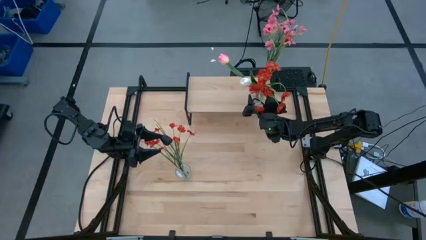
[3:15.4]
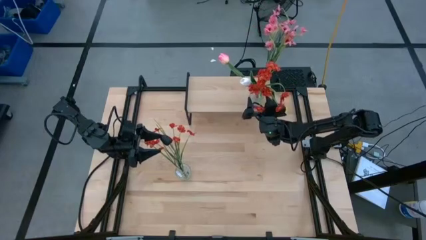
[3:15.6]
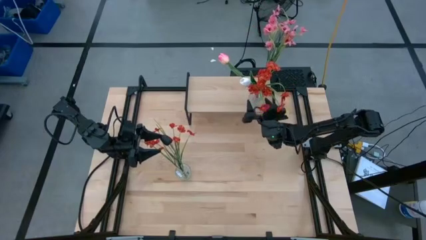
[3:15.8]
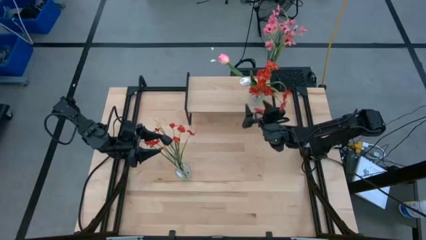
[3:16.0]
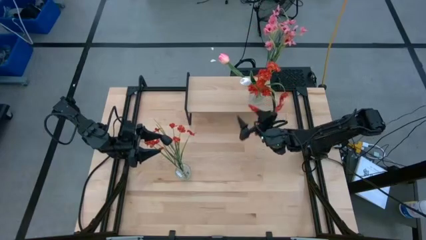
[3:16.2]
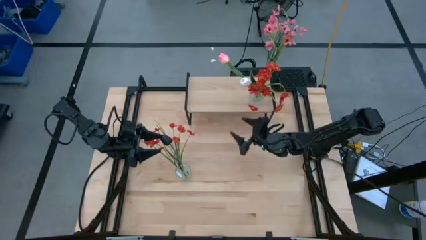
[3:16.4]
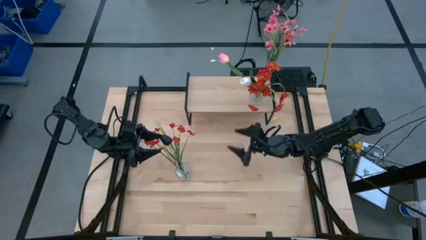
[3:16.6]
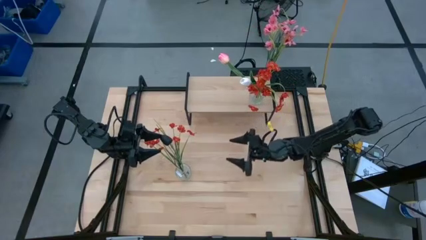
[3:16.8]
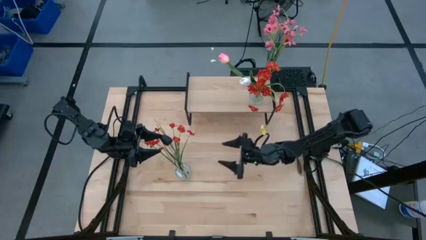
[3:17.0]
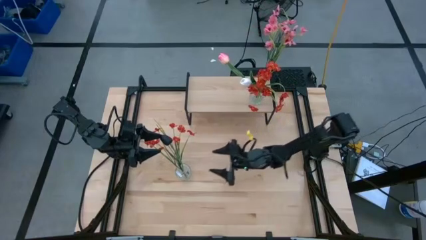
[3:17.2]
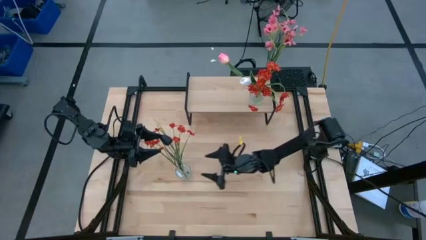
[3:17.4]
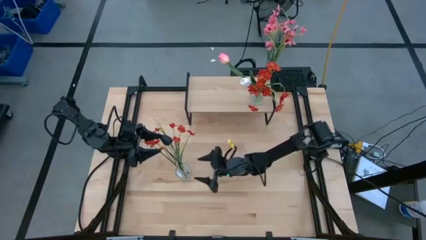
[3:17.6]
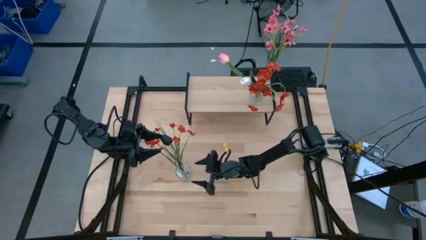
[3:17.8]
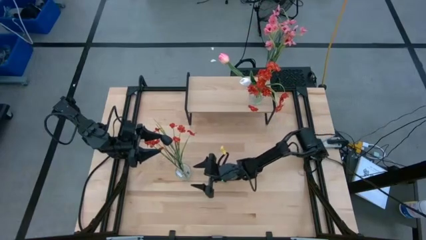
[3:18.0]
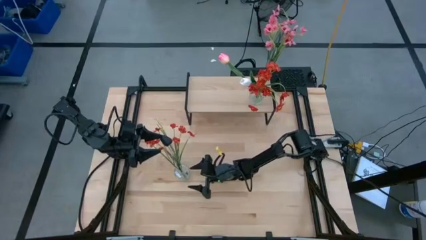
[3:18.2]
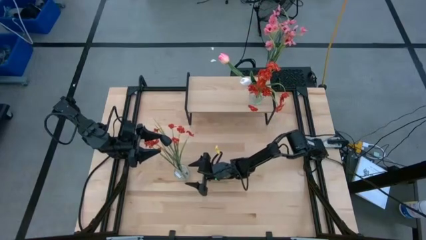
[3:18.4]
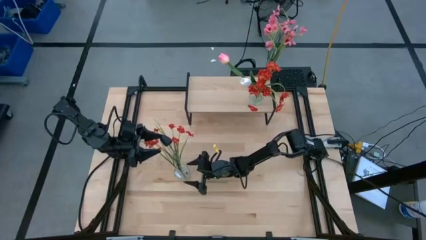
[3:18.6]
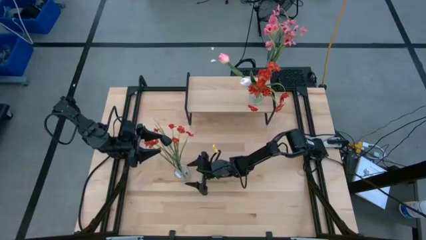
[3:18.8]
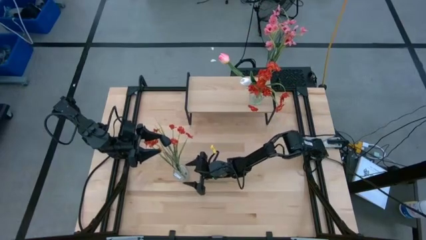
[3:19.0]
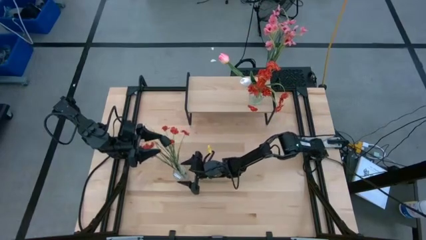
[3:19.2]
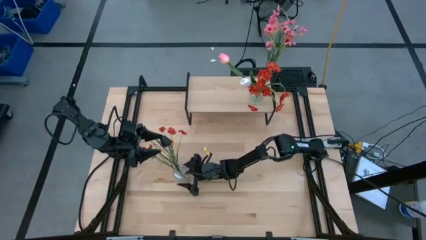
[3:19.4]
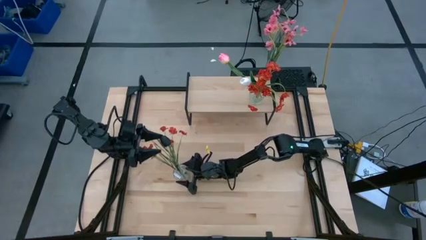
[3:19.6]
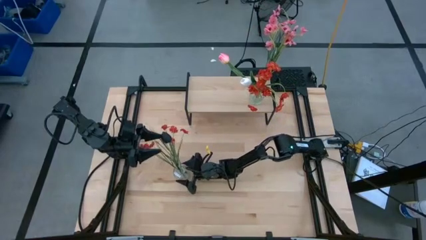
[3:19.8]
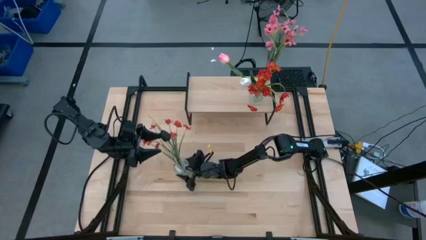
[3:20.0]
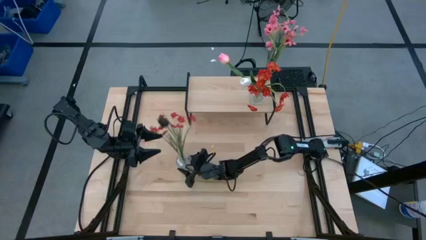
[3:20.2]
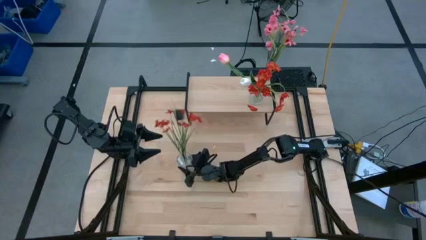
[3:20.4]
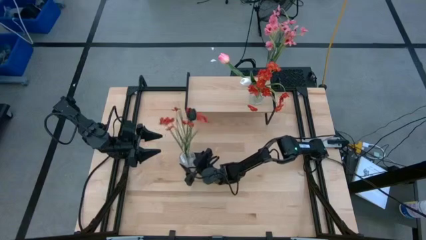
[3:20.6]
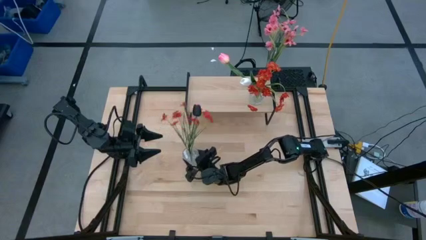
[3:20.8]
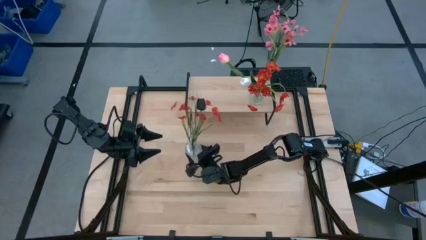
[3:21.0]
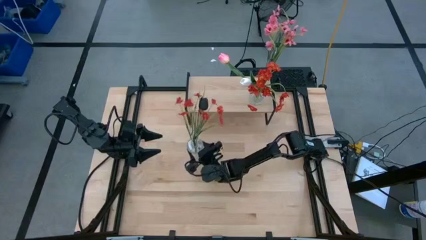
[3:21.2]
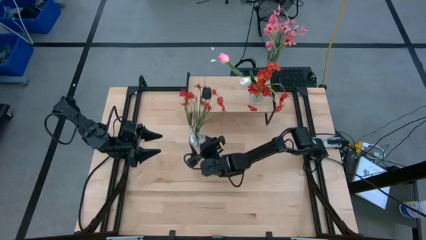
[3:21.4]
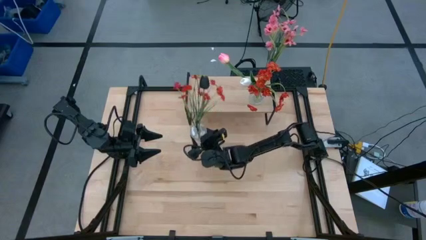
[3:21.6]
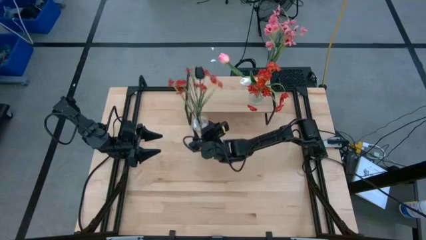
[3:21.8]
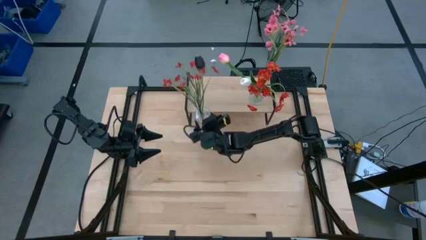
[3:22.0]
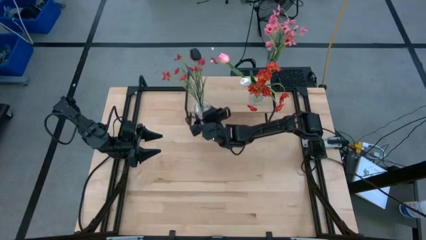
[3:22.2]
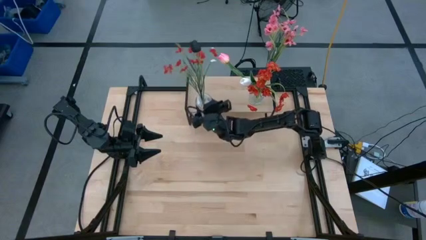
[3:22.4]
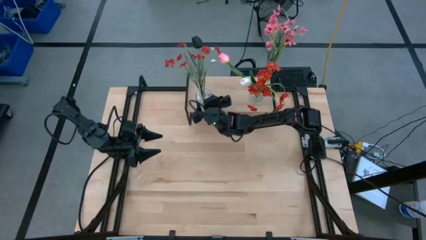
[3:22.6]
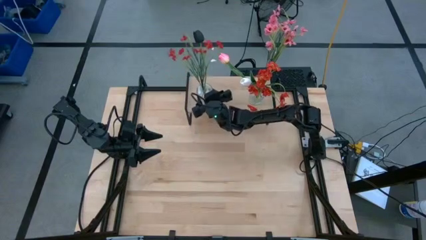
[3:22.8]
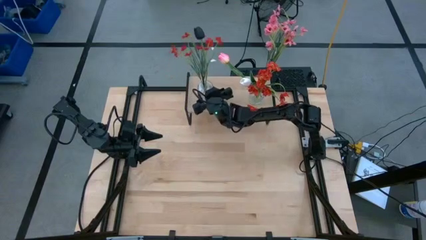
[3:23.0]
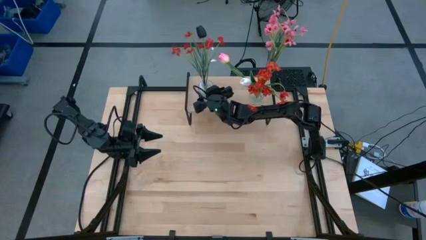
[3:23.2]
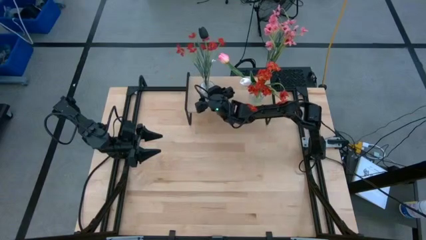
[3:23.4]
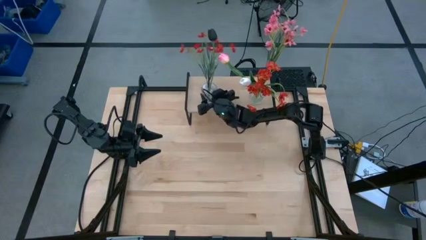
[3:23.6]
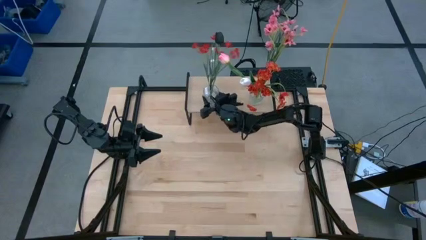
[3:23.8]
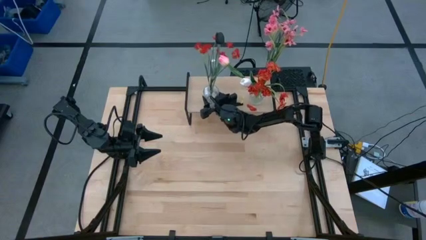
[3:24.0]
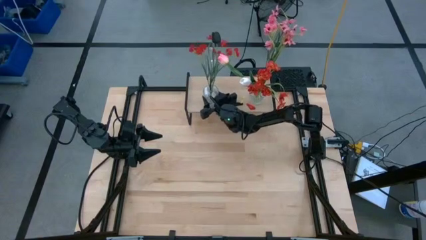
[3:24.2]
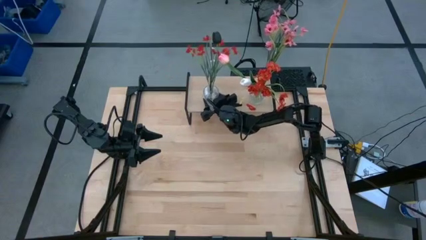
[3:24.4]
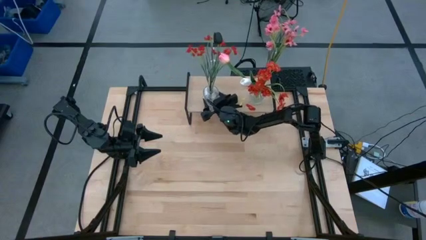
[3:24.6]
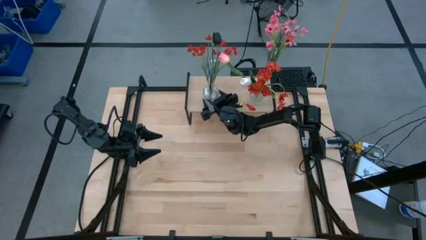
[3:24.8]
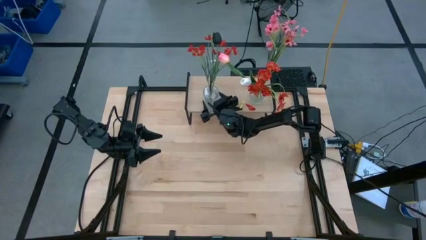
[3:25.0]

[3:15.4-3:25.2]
Task: Pick and place flowers into a vace then onto a shelf
Put the transparent vase with flowers on the shelf

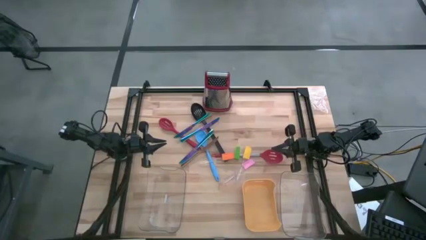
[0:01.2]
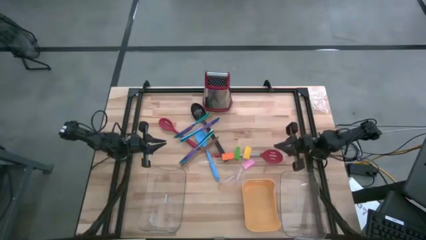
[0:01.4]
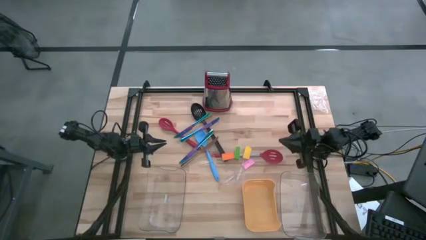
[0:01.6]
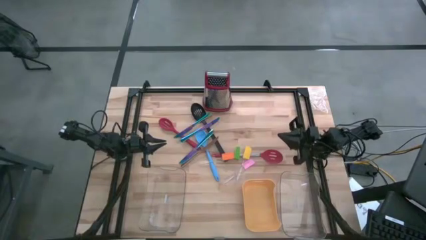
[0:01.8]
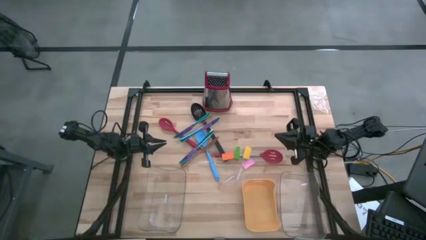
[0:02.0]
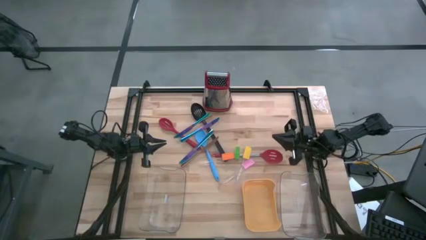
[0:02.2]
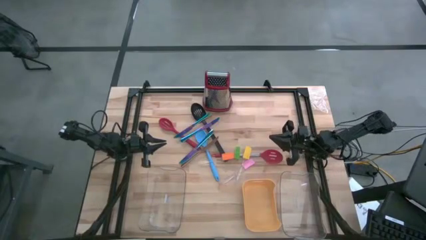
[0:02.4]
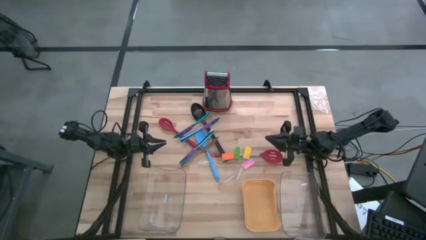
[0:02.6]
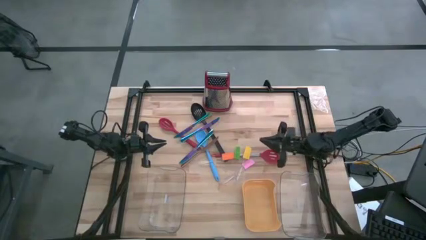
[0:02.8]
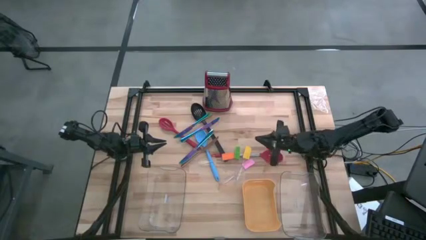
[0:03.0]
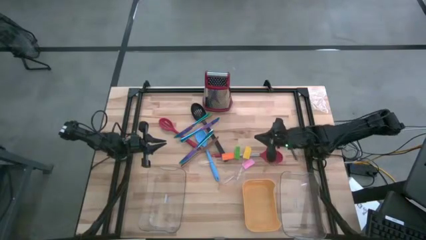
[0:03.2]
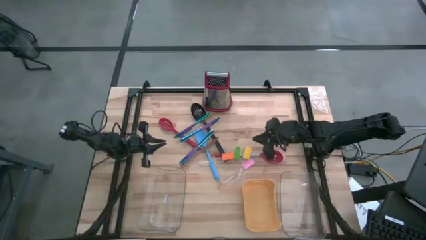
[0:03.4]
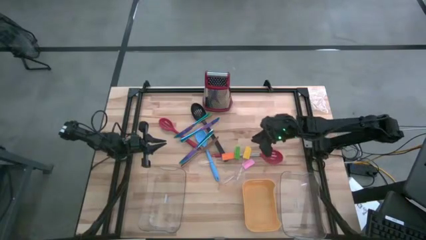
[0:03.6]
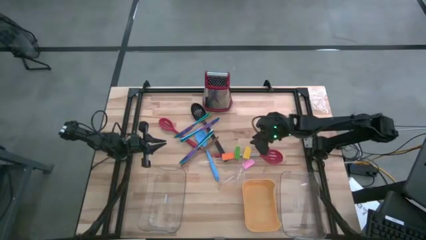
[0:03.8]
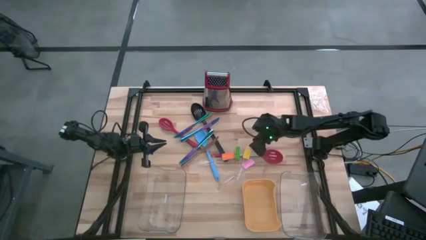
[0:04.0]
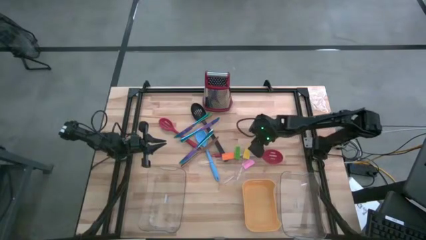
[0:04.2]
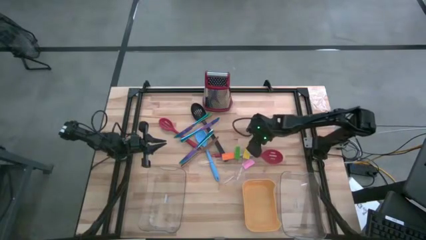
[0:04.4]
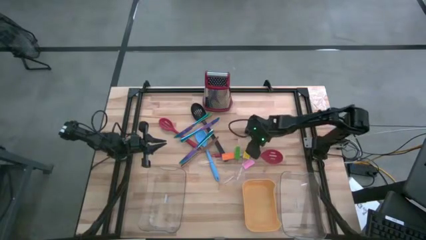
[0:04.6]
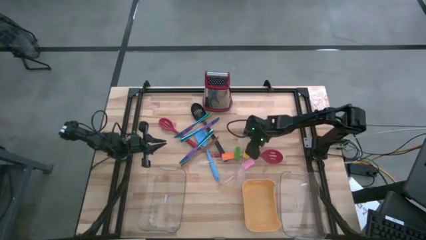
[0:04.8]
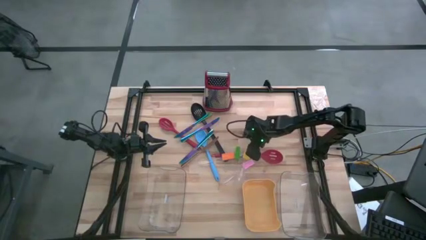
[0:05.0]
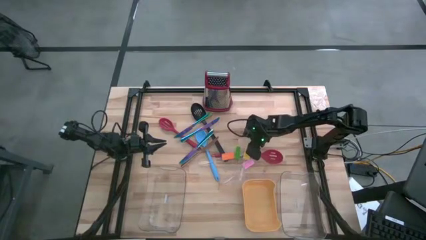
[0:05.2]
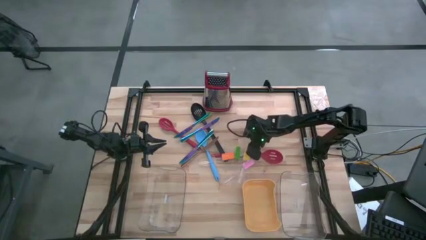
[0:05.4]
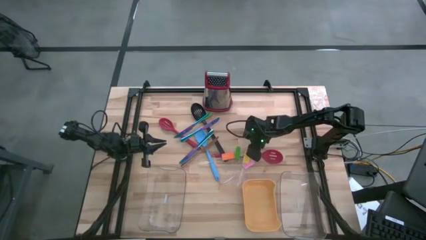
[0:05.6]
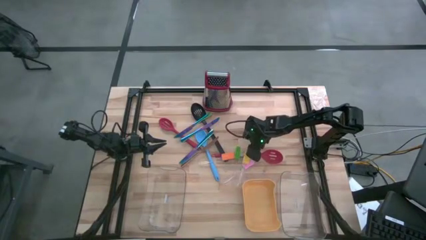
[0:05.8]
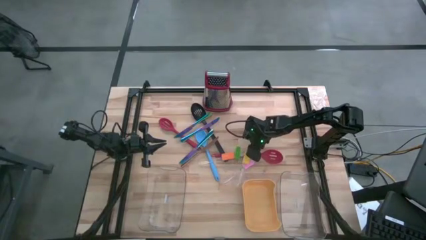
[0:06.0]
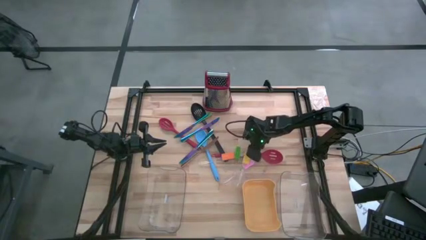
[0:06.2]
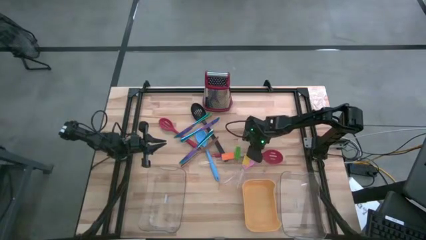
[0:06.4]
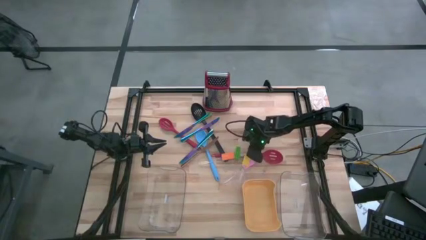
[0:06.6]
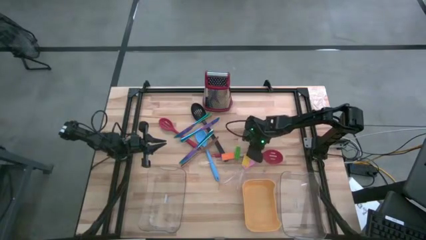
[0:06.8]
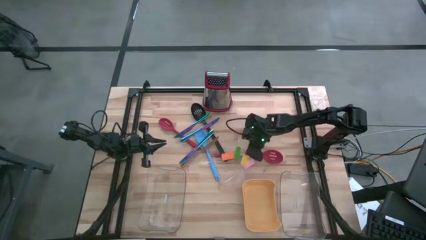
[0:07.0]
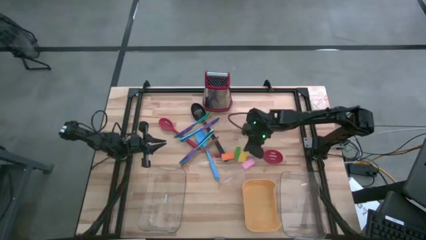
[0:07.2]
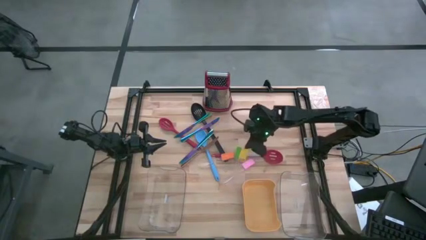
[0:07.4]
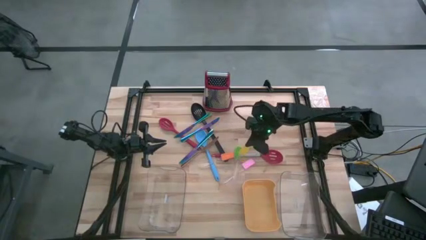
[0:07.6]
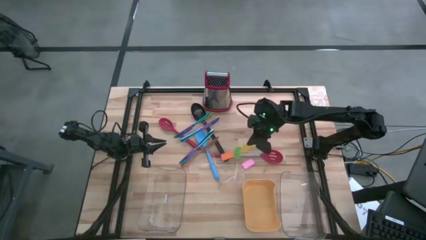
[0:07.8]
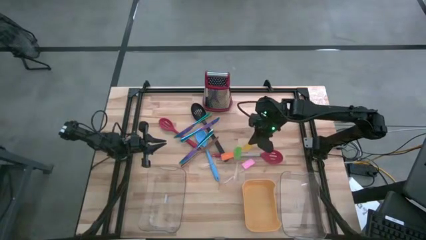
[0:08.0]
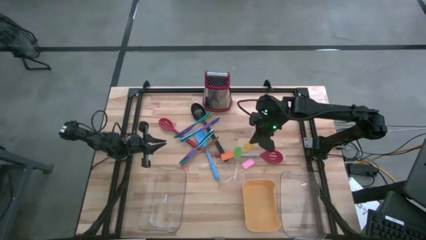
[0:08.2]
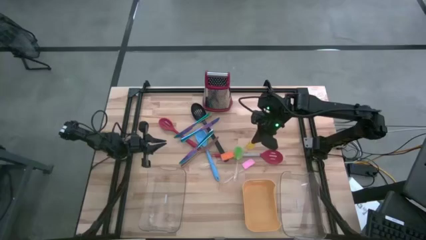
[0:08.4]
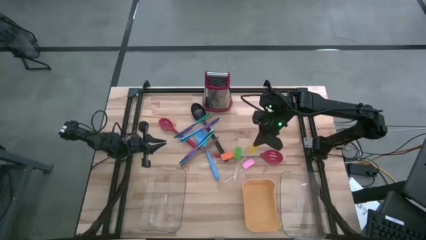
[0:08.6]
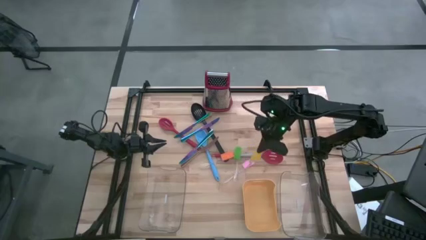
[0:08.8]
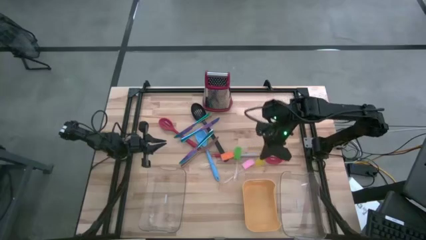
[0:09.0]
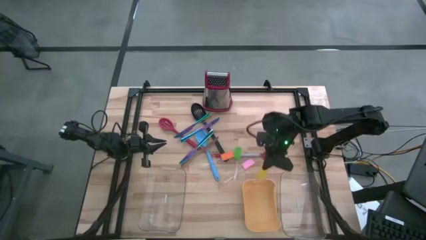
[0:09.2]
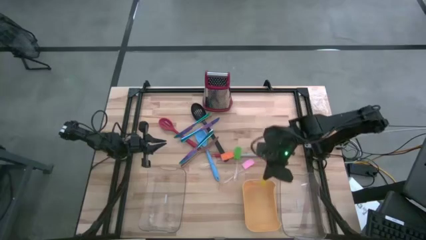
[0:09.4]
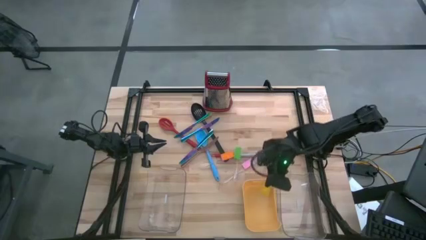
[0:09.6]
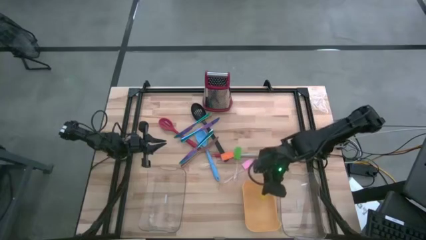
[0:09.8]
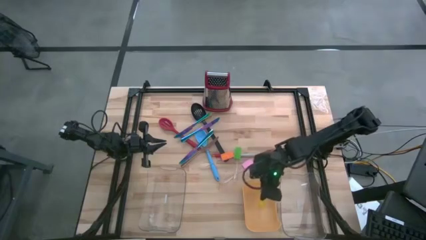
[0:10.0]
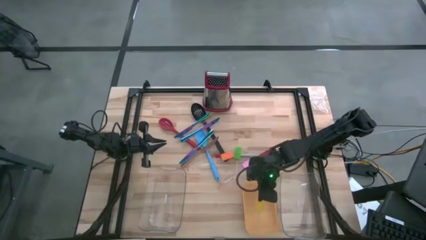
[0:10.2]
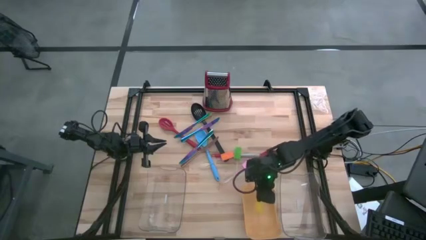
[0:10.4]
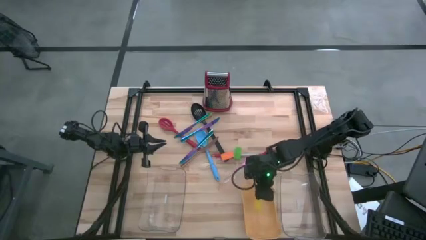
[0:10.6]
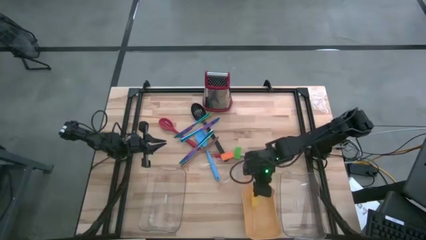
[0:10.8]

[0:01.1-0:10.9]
Task: Pick & Place Kitchen Items
Put the yellow spatula into the yellow bin
